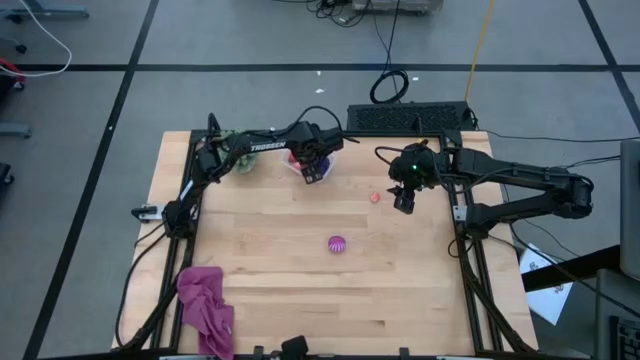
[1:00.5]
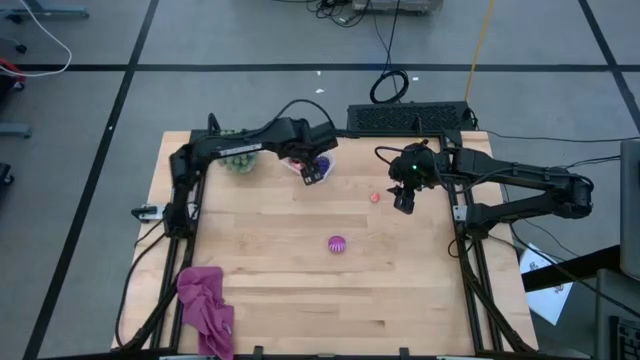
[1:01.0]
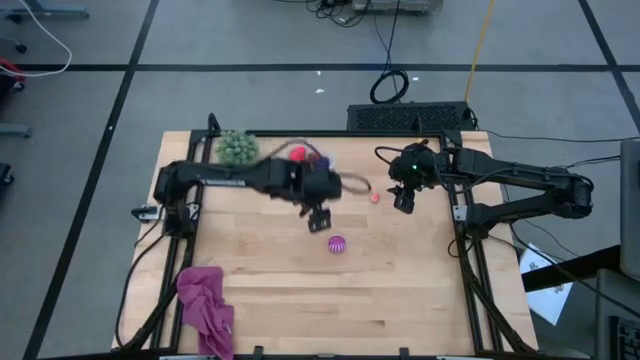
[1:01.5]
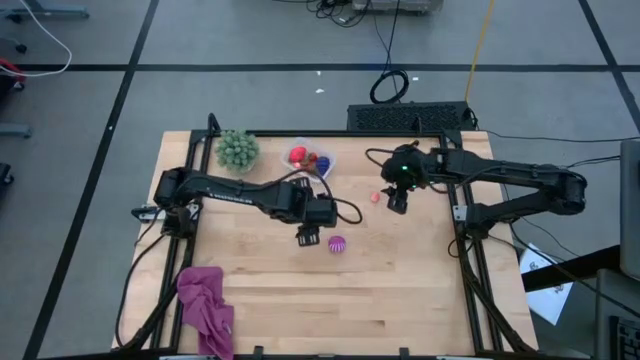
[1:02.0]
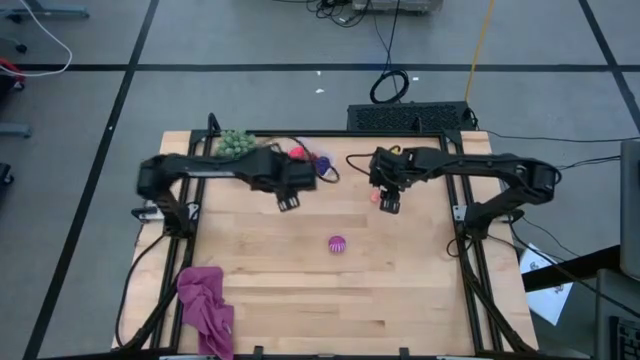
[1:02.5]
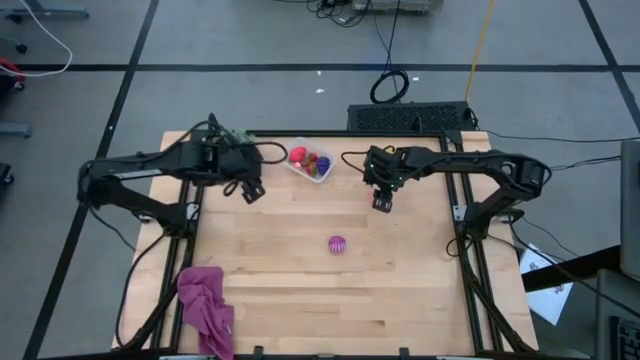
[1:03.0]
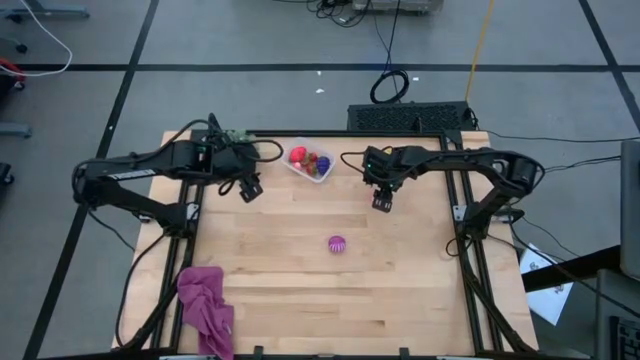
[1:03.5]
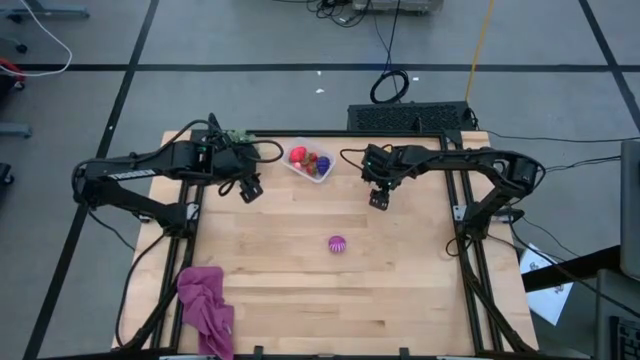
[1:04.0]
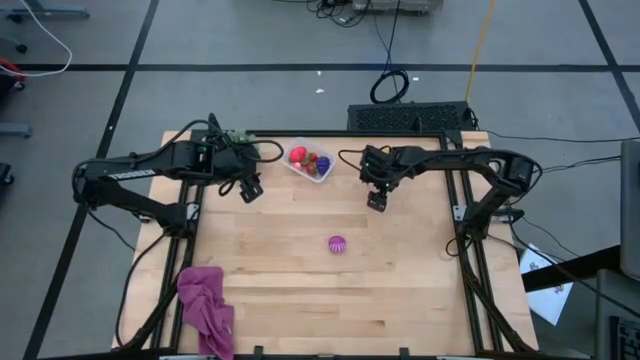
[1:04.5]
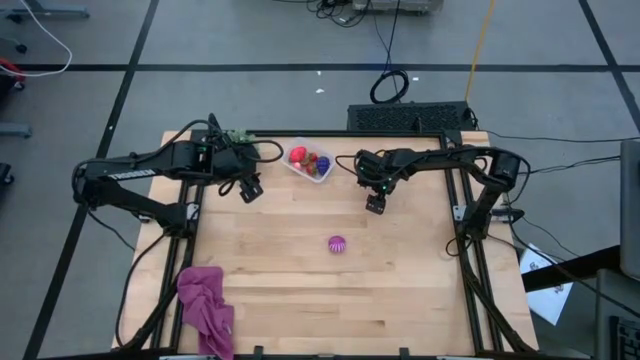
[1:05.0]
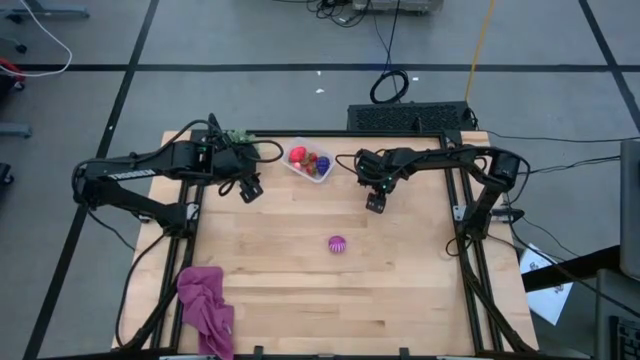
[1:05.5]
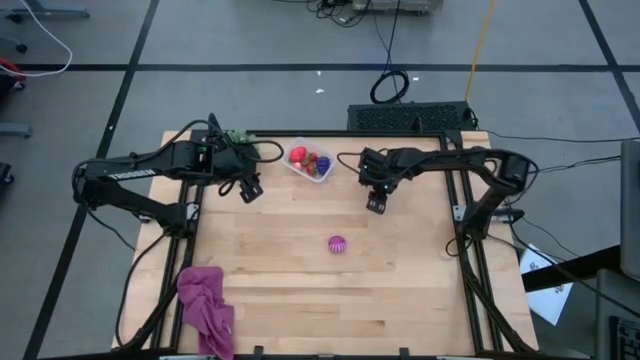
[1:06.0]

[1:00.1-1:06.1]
Task: Pick and placing Produce into tupperware
Put the pink peach into the transparent bin

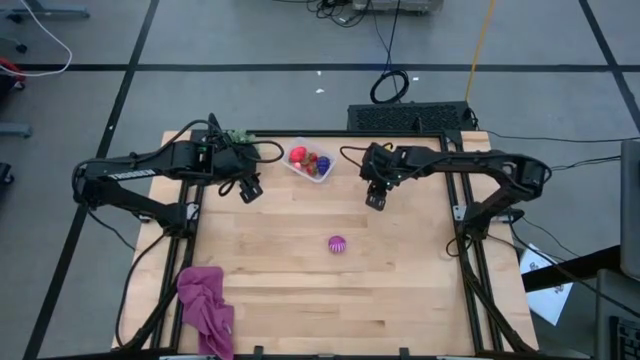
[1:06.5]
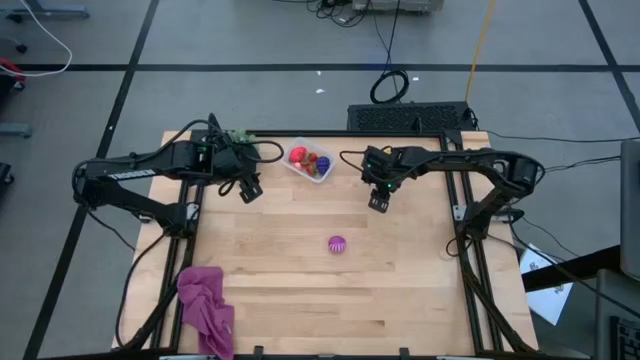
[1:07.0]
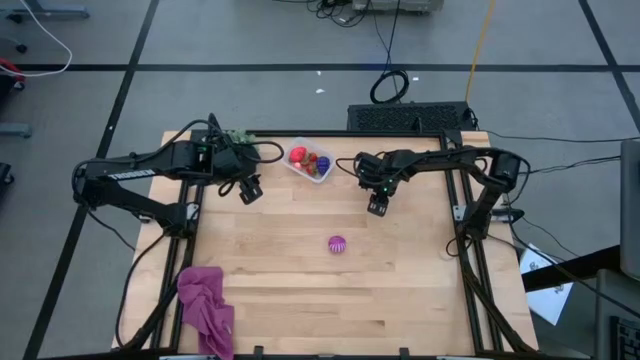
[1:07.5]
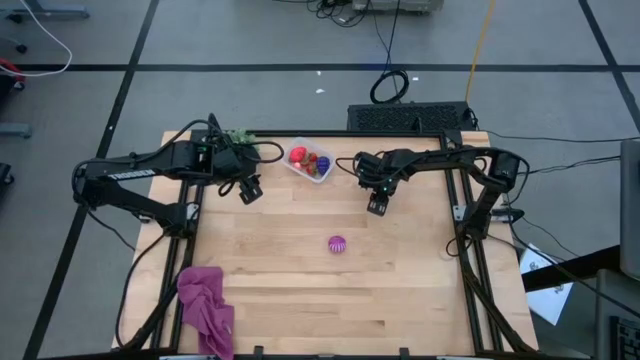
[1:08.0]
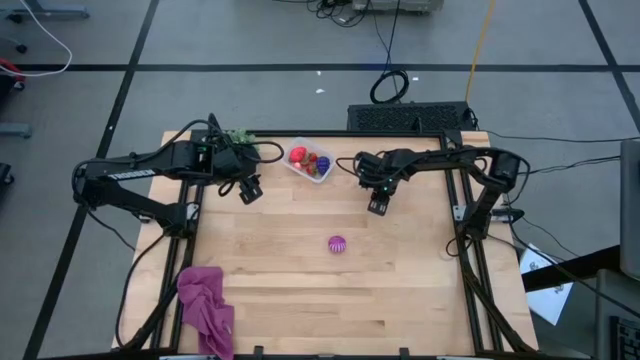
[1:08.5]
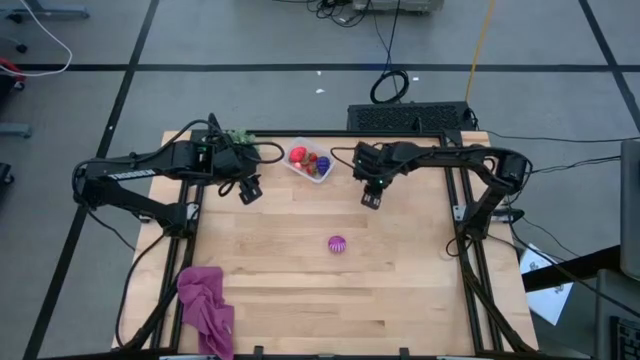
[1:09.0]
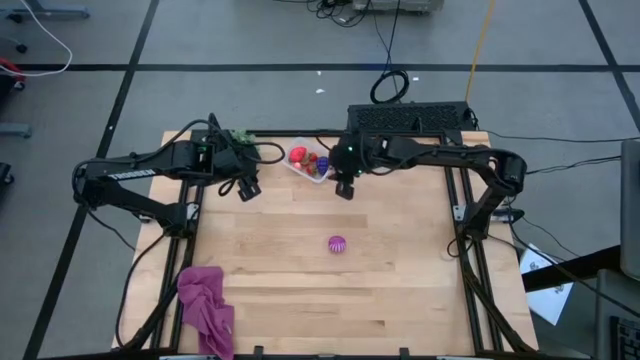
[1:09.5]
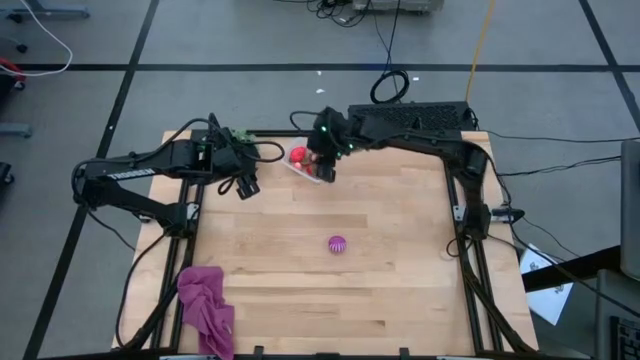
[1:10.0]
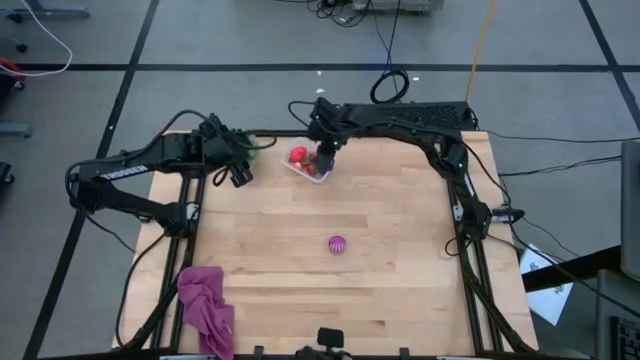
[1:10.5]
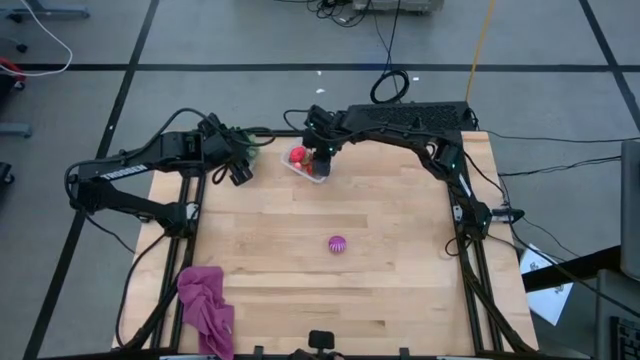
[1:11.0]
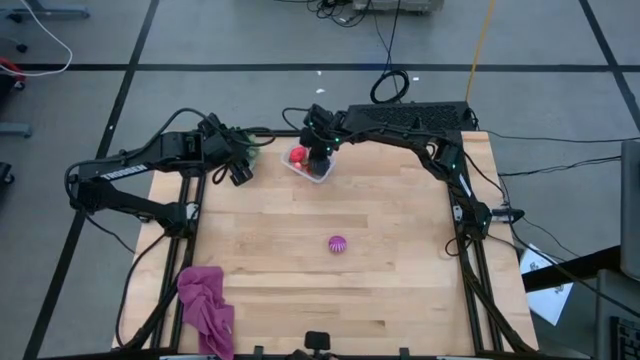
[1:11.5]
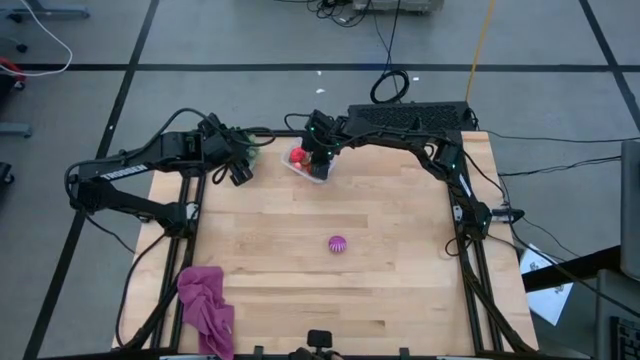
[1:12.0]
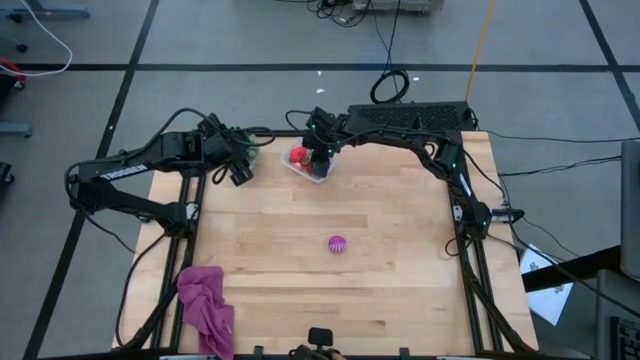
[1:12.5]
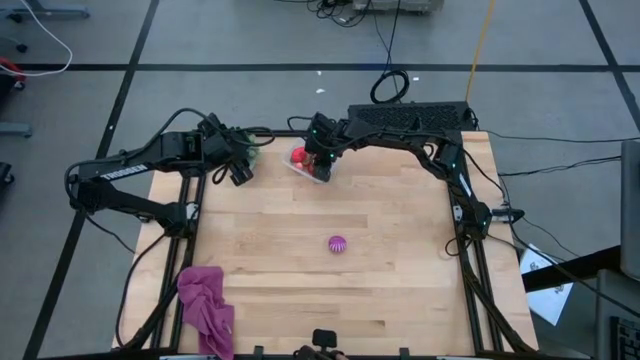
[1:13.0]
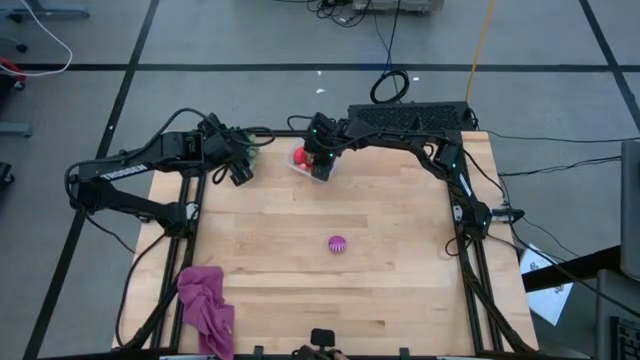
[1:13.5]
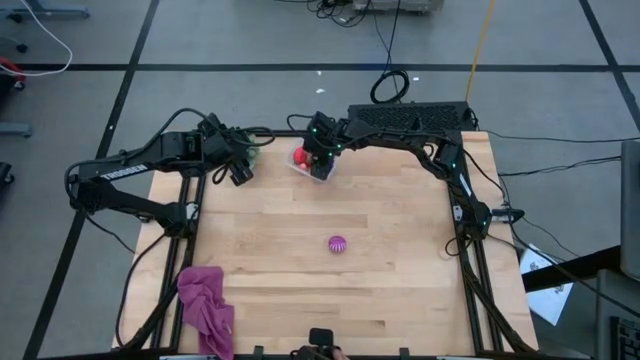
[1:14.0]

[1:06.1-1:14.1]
Put the pink peach into the transparent bin

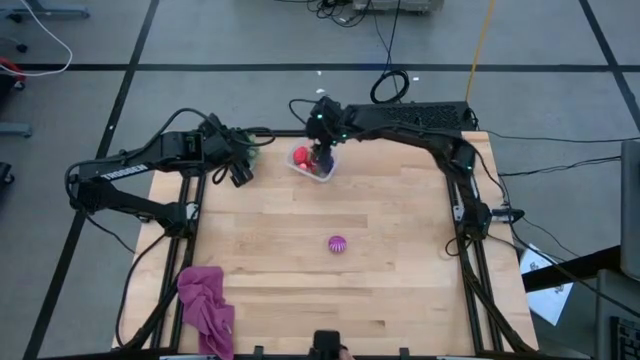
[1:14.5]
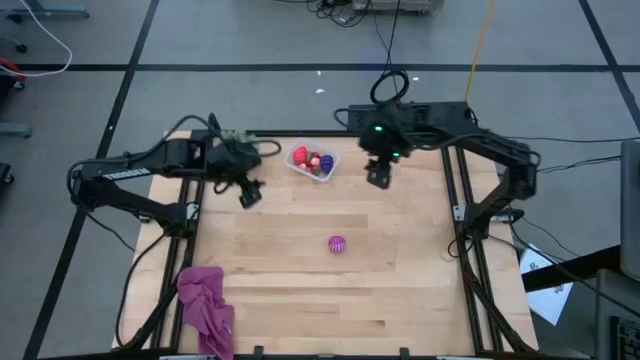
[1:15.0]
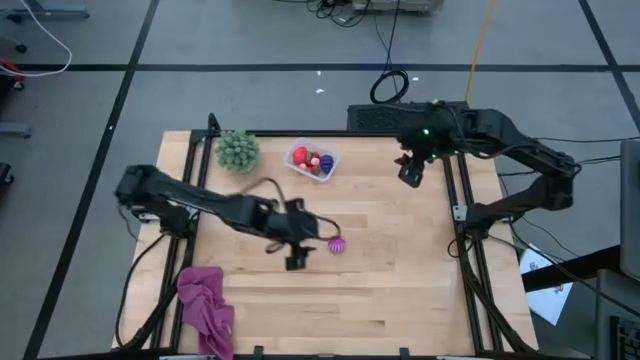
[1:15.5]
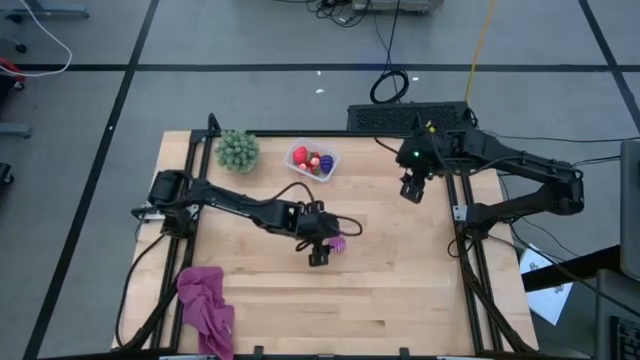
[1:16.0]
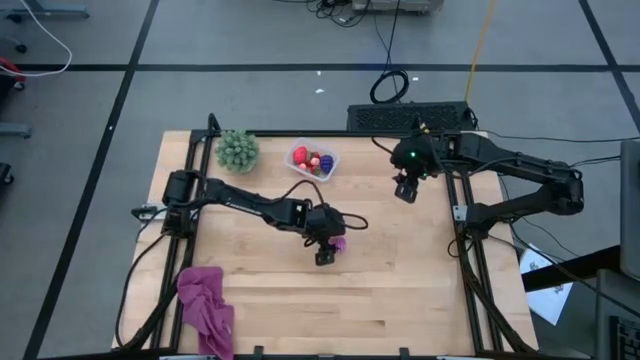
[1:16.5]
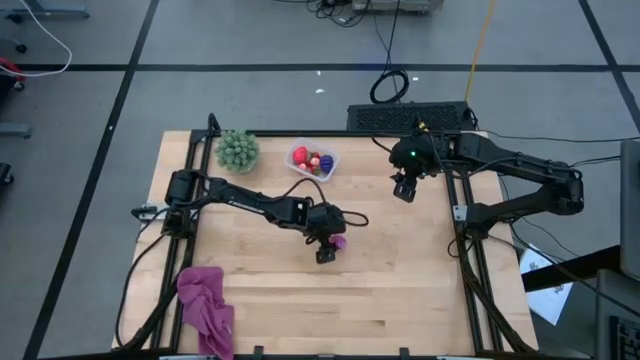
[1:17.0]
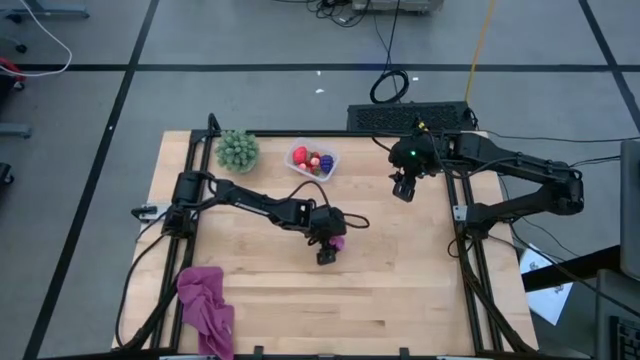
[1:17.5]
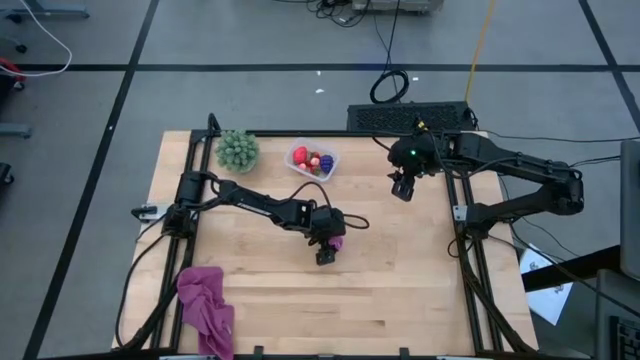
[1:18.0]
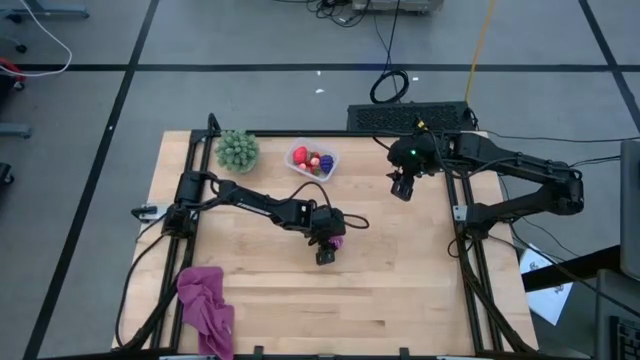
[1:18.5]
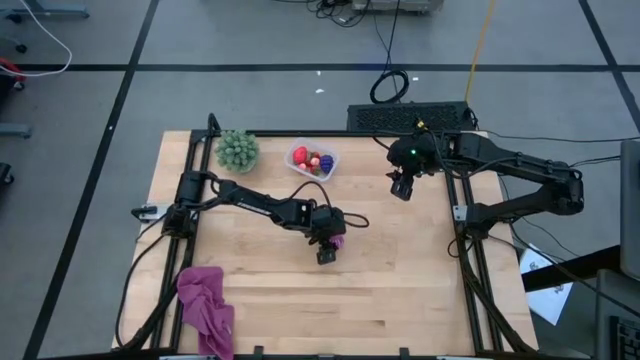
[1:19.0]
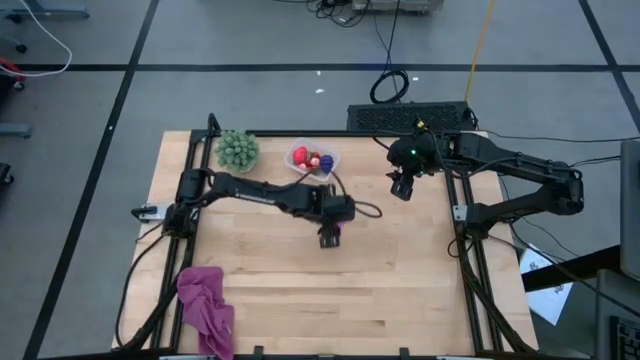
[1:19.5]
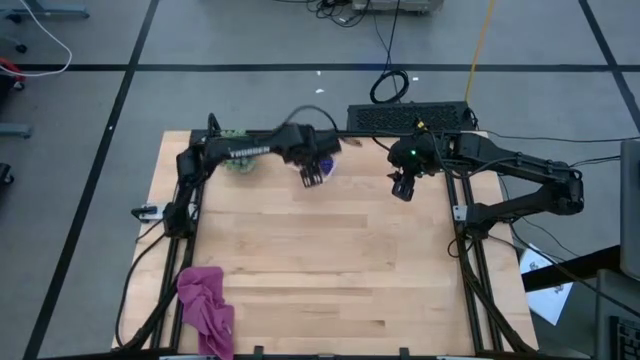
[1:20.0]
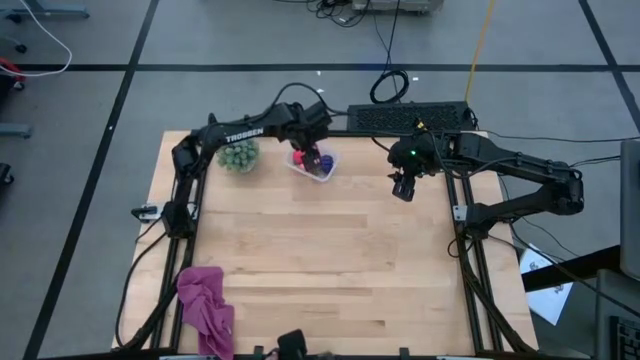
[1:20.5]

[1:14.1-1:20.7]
Put the purple onion into the transparent bin
